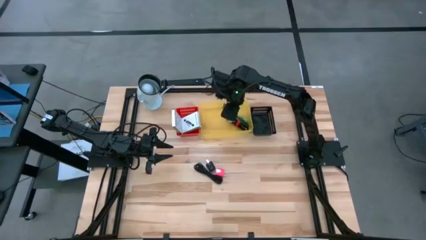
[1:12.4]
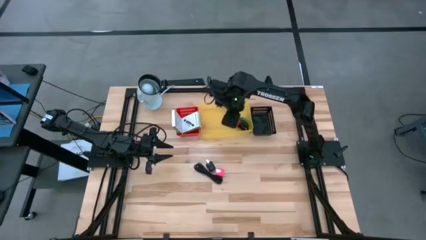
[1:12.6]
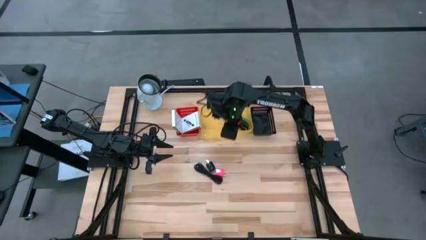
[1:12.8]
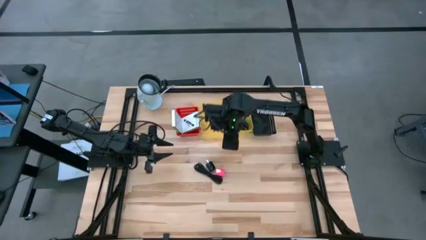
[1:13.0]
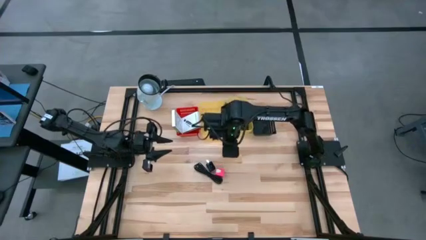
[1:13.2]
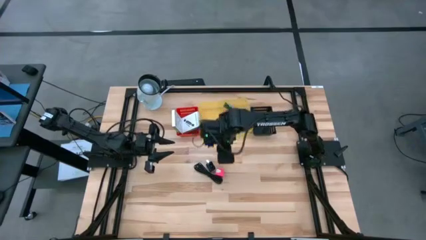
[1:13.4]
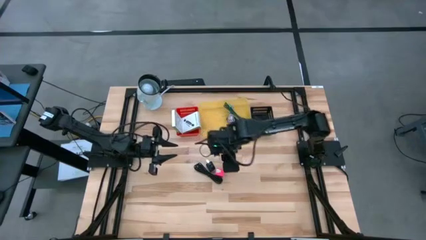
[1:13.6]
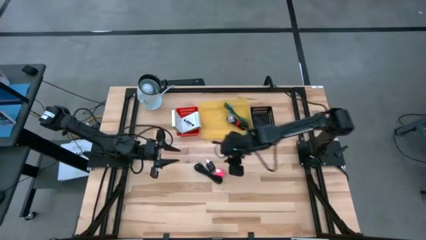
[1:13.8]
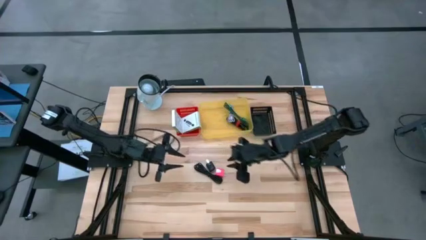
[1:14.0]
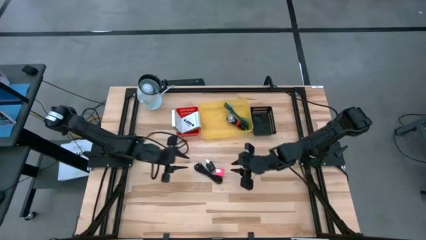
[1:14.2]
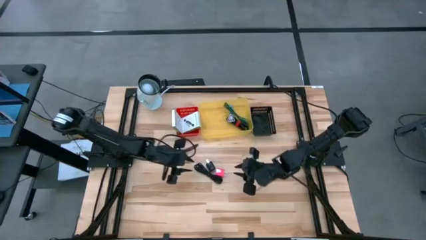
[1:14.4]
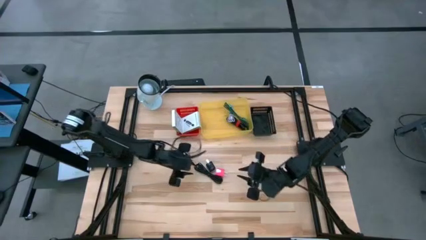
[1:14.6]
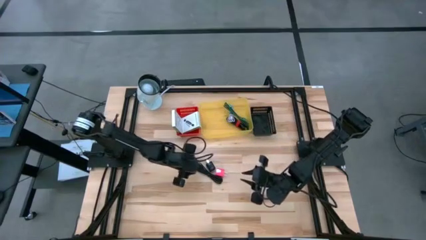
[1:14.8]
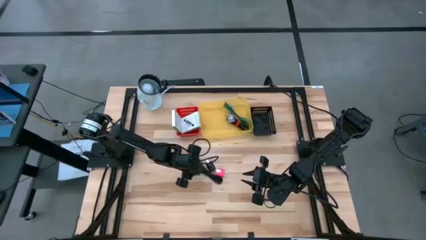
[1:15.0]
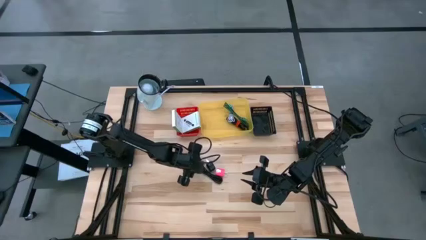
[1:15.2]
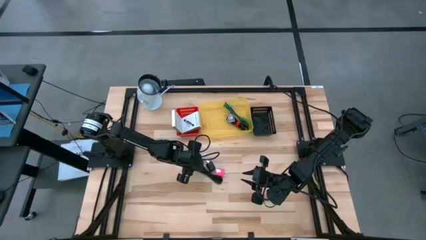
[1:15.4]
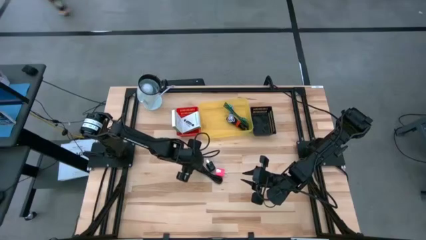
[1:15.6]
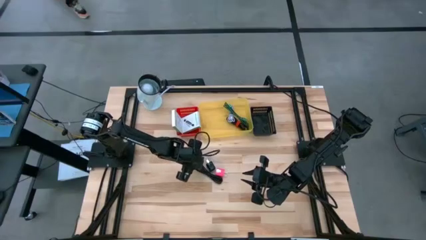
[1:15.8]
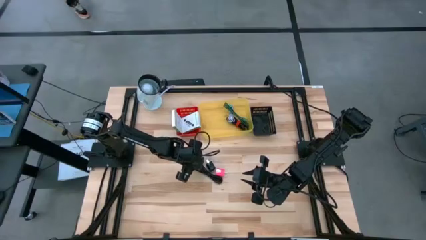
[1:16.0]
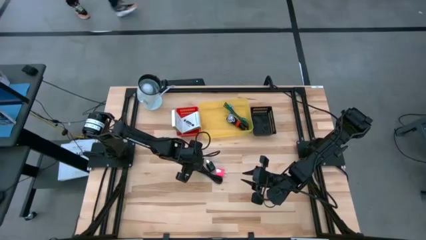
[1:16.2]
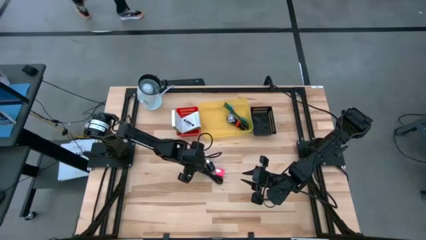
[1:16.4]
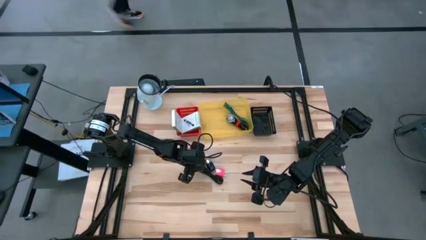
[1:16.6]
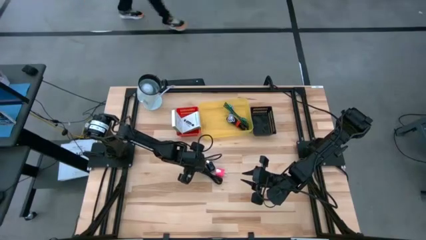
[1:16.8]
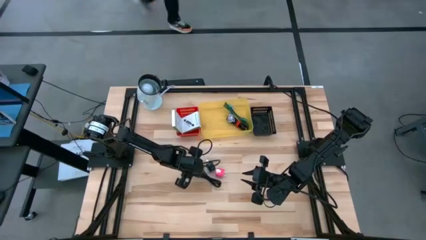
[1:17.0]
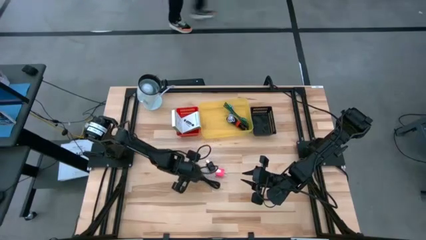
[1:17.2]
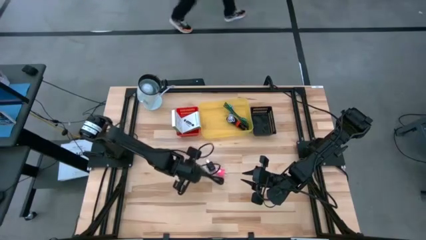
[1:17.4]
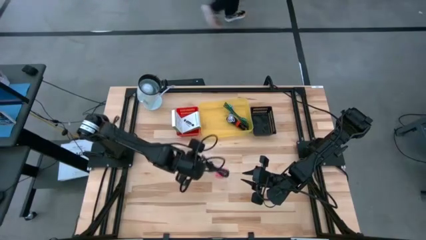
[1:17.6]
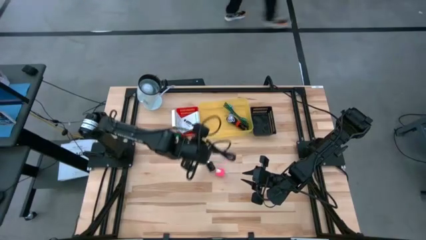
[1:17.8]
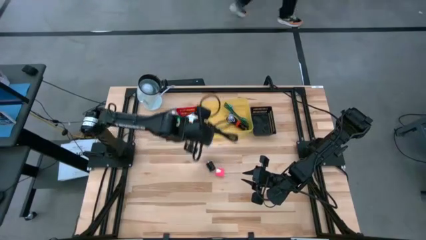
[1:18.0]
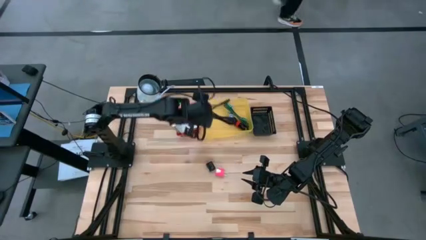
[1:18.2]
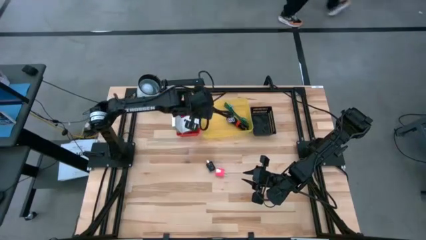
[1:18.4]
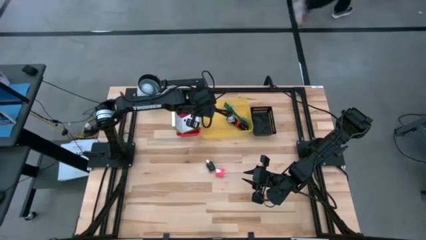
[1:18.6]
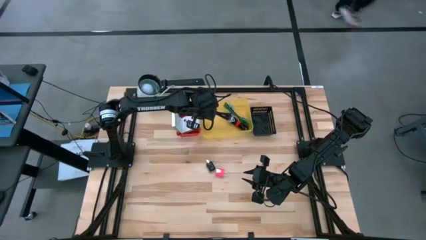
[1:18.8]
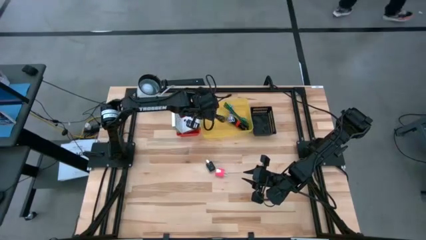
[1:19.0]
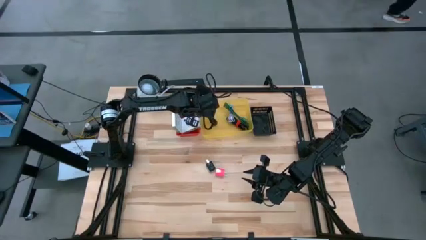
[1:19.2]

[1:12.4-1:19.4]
Task: Pick and place items into bin
Put the black charger cable into the yellow bin

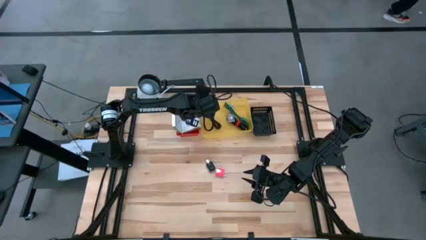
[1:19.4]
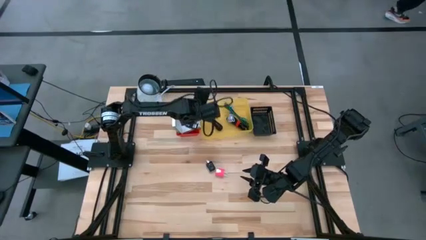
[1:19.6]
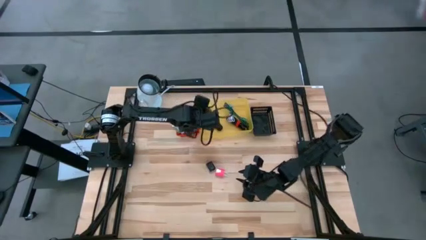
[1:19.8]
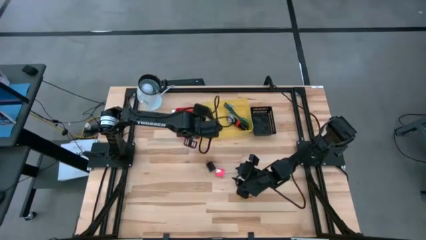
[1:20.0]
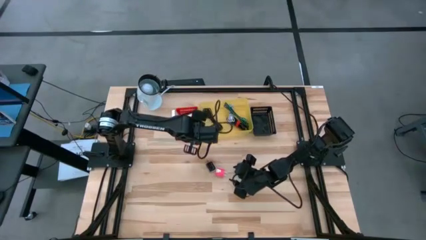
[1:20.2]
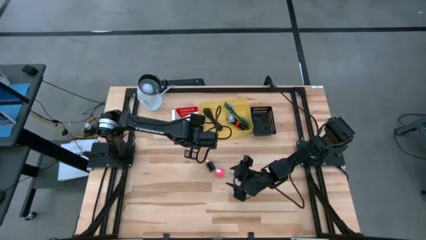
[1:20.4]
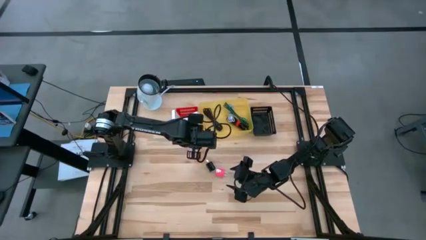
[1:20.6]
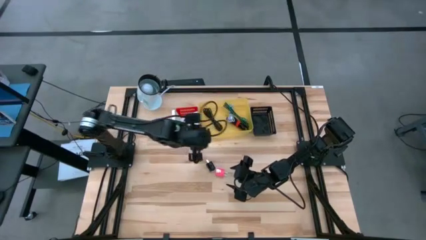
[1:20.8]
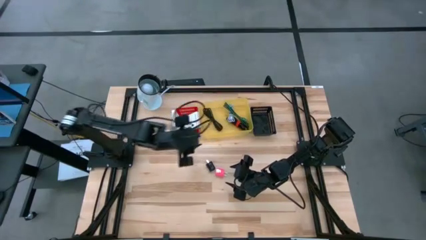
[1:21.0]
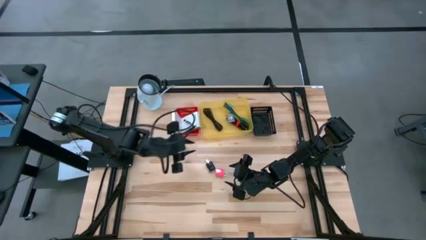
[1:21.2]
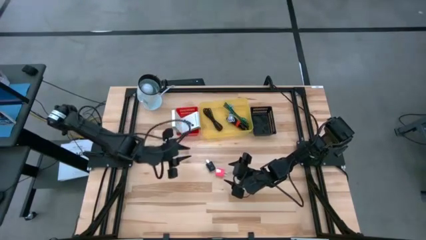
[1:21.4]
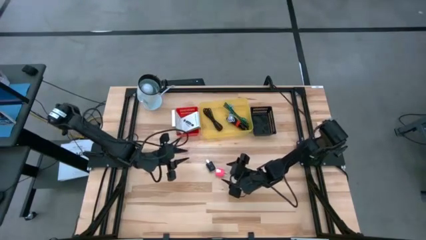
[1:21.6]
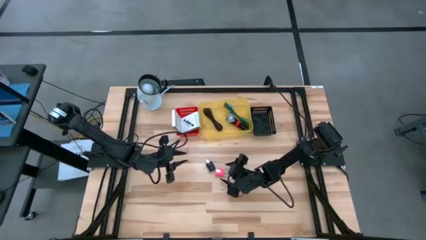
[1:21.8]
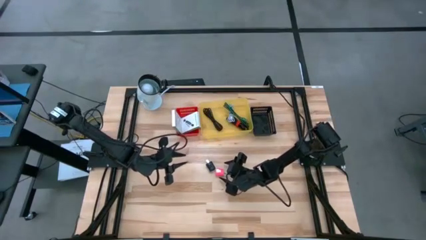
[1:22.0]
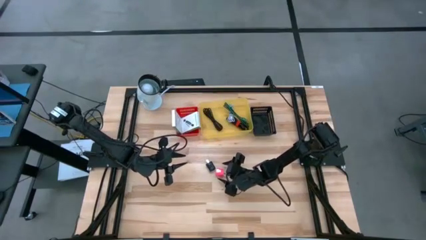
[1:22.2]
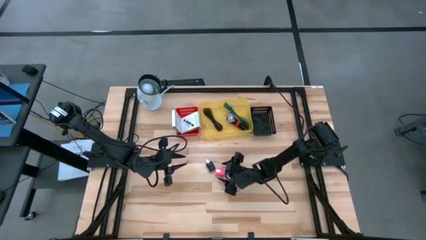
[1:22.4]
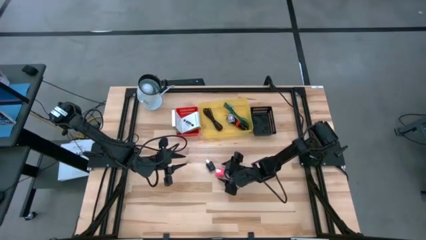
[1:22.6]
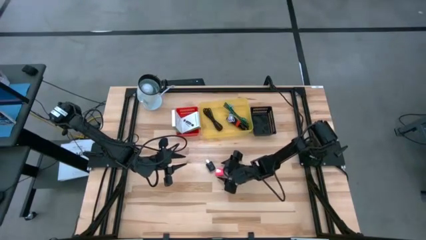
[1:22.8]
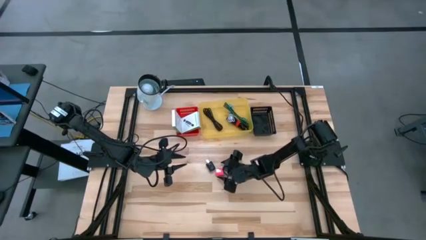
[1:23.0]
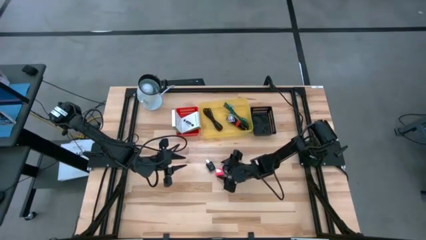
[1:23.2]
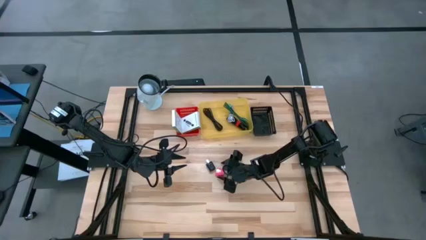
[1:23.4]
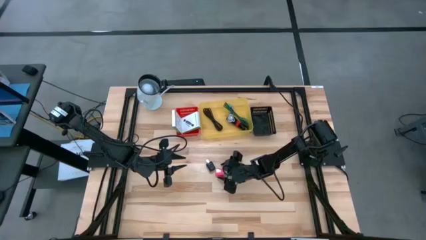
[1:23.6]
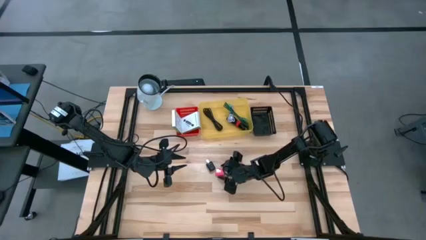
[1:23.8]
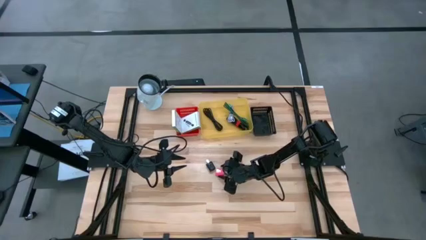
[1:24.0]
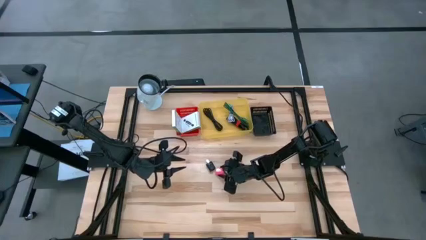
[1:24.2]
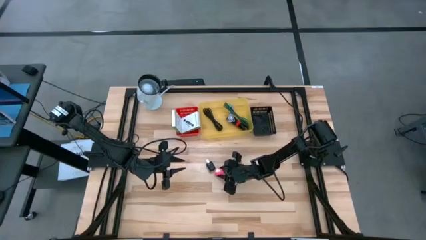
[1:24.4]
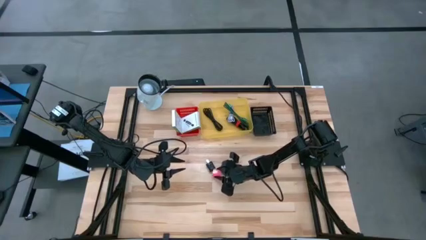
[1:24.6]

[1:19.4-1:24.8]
Put the pink charger adapter into the black bin

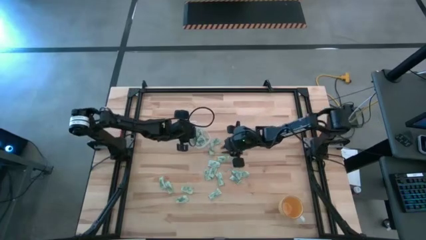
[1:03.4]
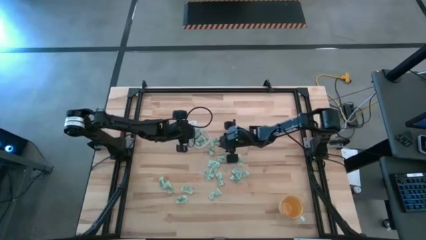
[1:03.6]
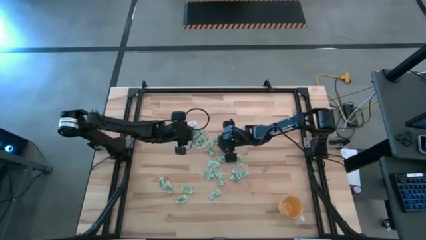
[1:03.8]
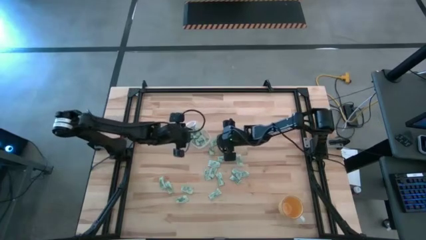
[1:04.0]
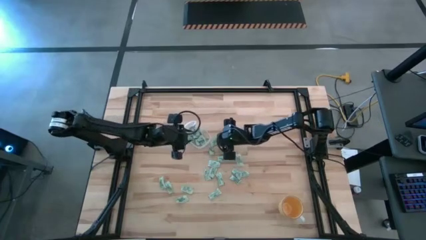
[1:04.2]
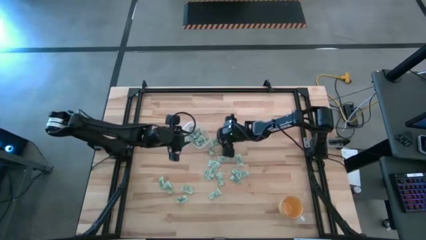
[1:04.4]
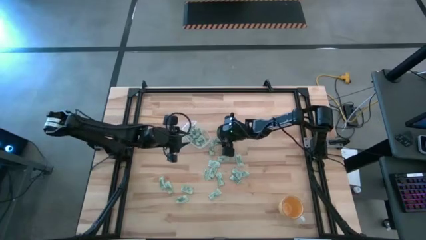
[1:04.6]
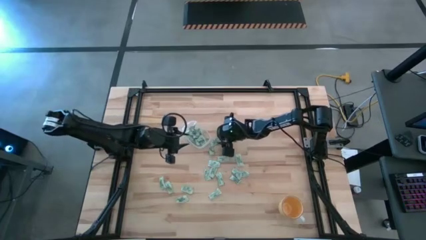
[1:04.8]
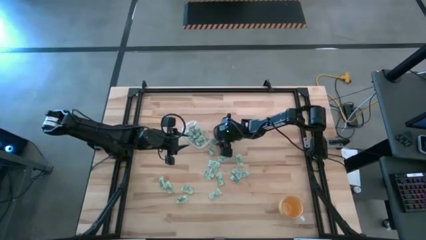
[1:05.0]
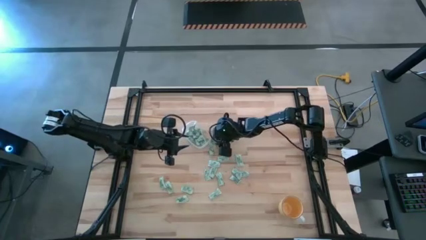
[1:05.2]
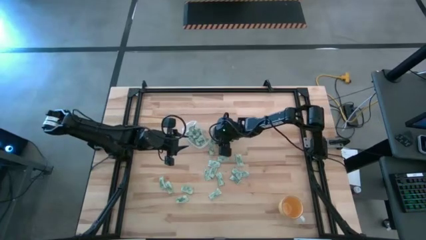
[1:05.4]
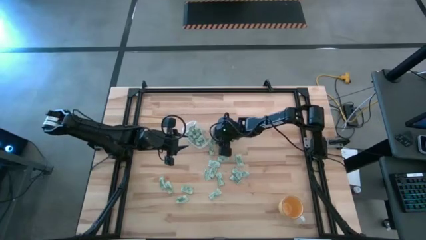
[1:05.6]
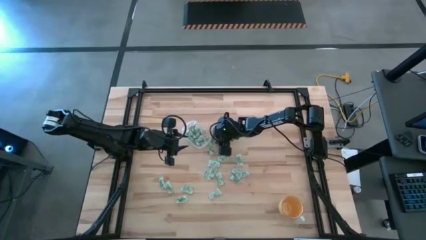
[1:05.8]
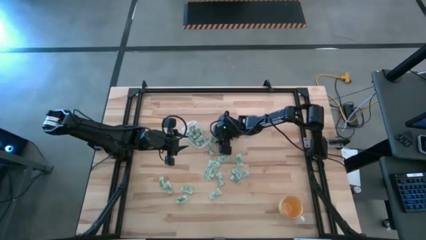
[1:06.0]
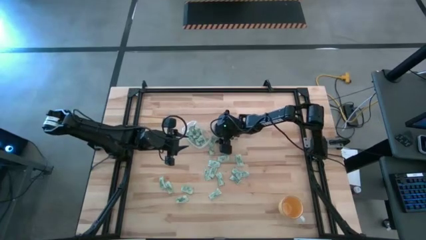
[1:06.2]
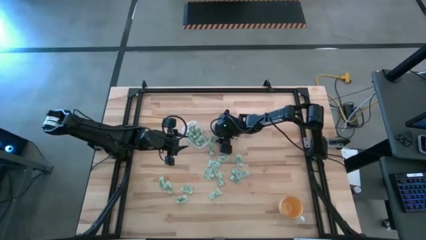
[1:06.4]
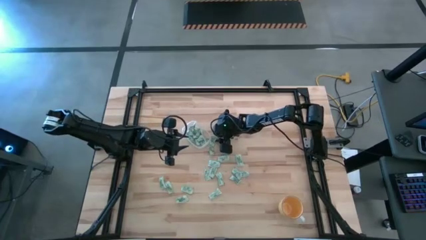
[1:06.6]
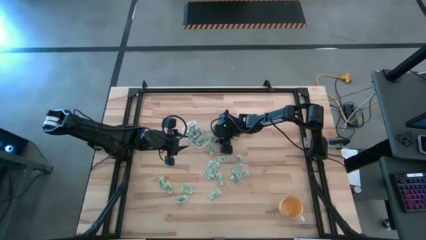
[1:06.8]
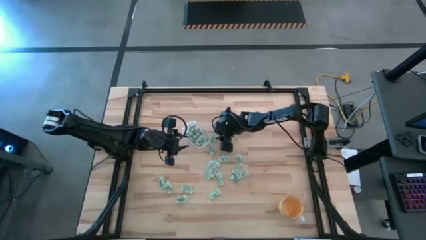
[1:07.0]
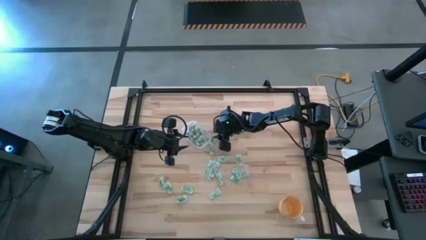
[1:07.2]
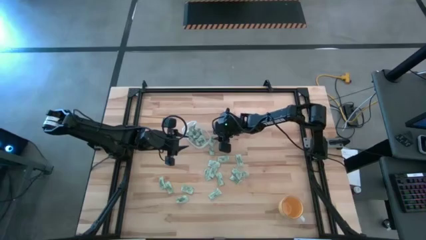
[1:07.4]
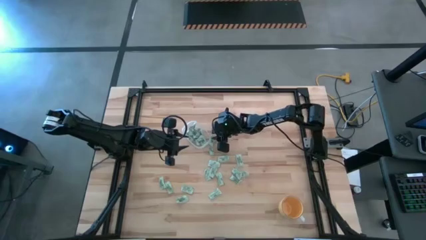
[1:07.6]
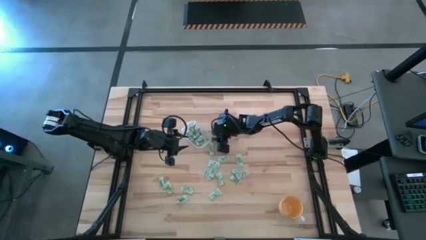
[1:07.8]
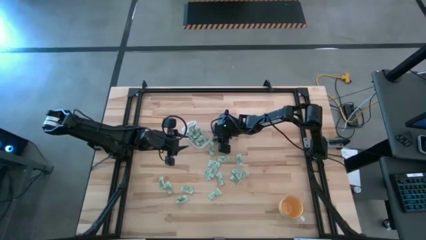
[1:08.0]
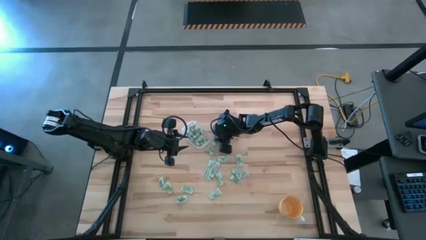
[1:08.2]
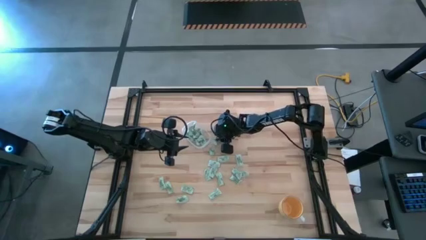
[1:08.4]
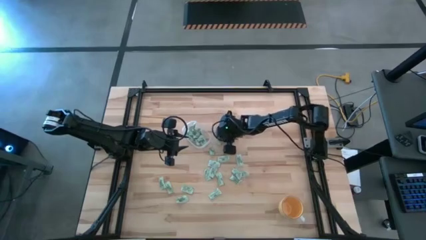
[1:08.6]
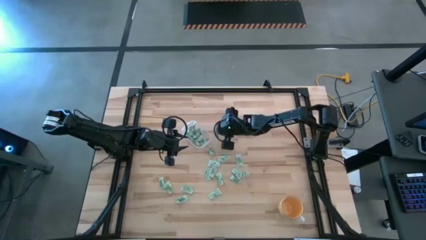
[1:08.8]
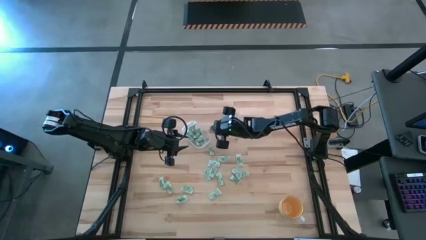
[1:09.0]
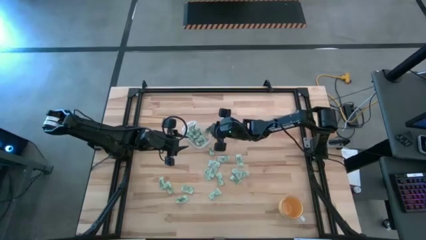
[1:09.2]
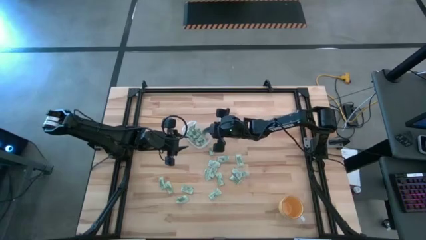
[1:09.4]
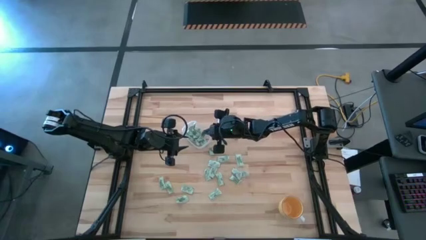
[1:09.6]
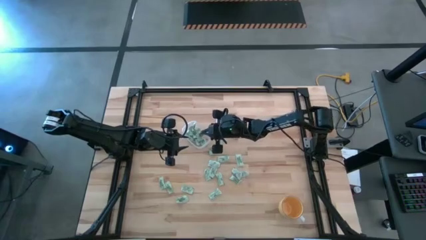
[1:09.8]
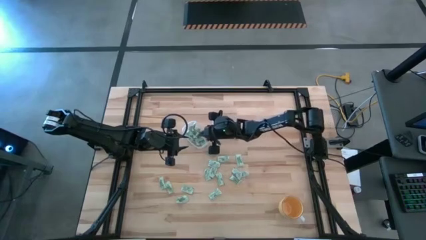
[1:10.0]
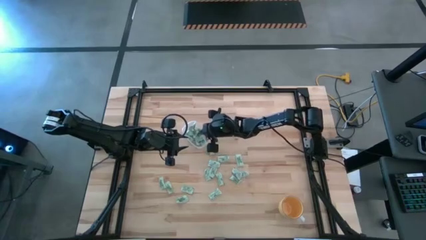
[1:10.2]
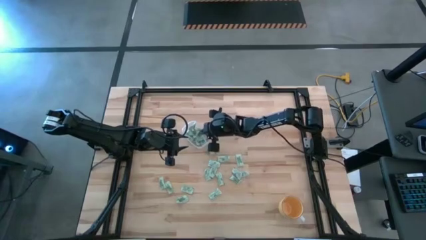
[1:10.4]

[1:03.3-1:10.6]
Task: Pick and place Stevia / Truvia into bins
Put the stevia packet into the transparent bin
